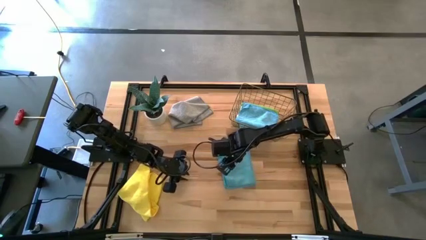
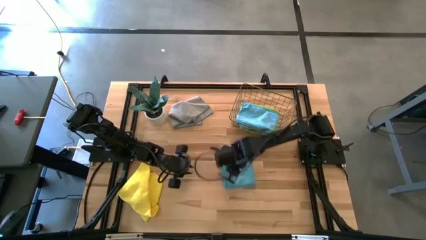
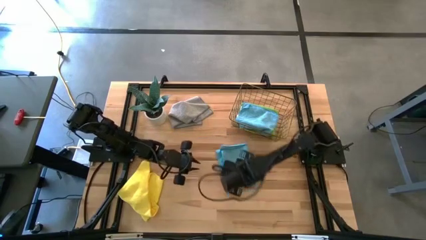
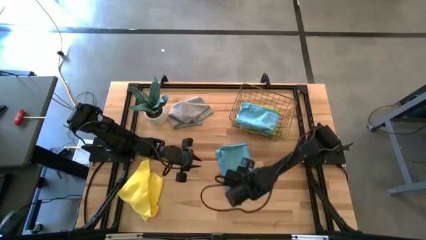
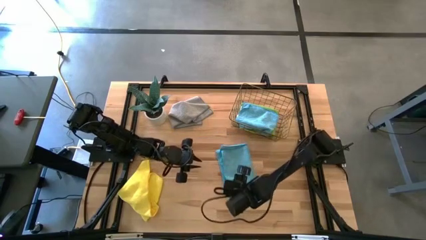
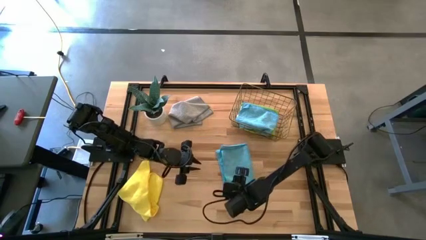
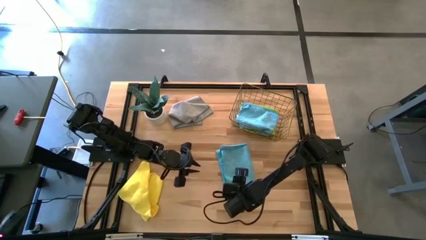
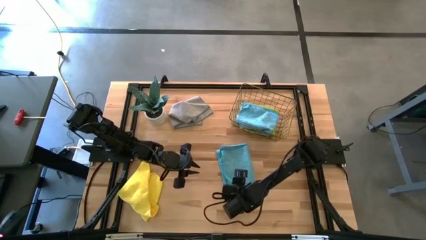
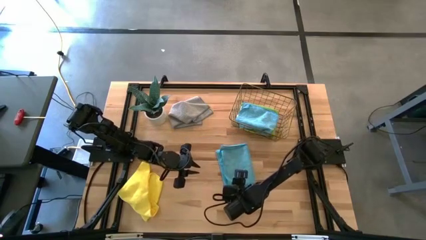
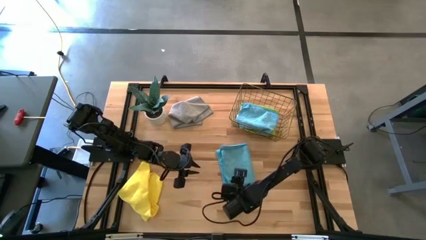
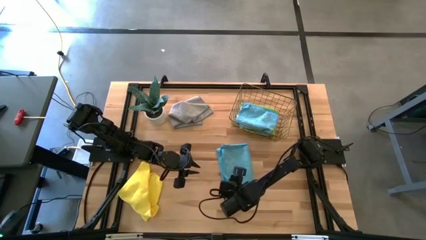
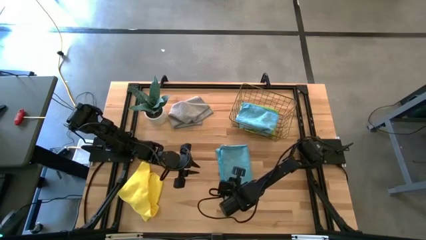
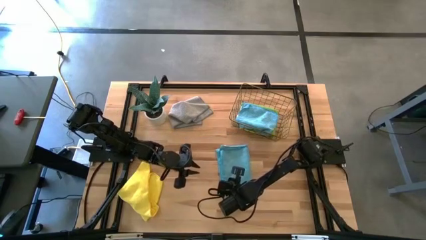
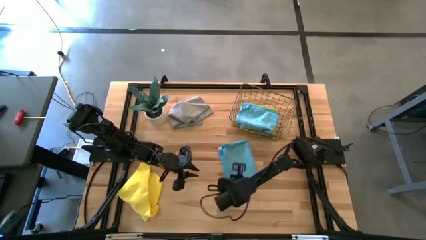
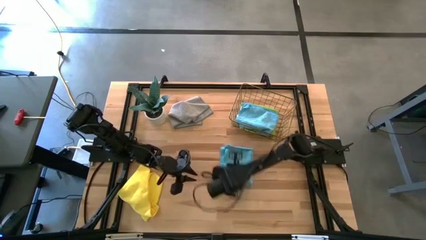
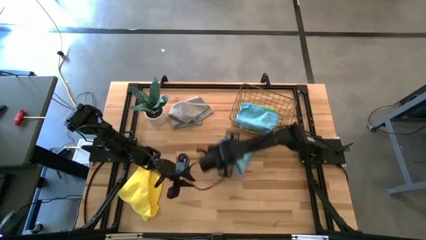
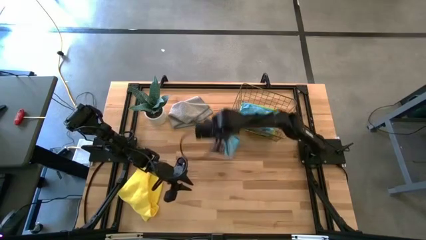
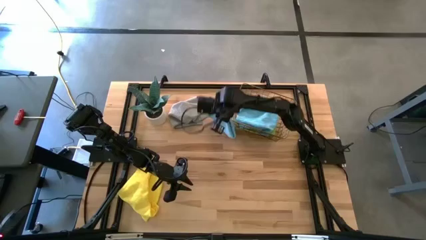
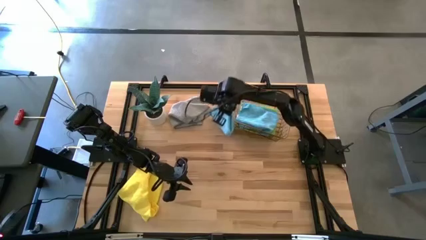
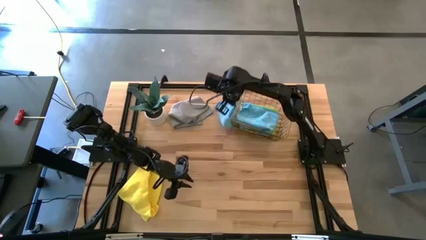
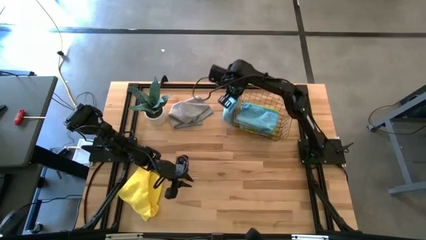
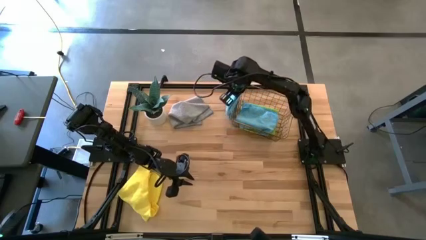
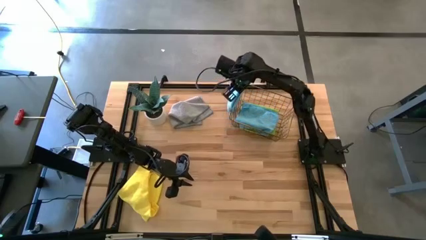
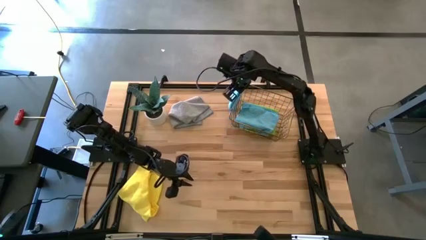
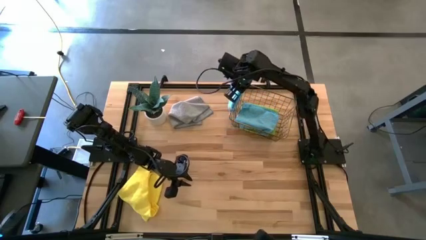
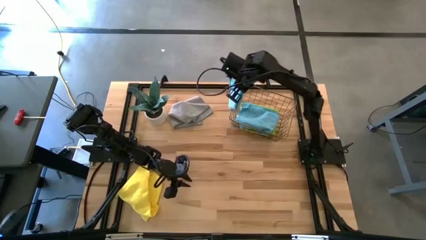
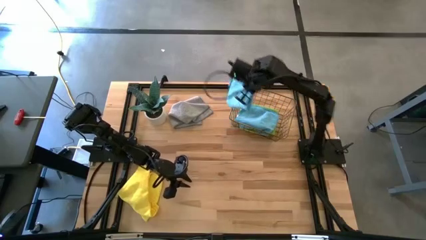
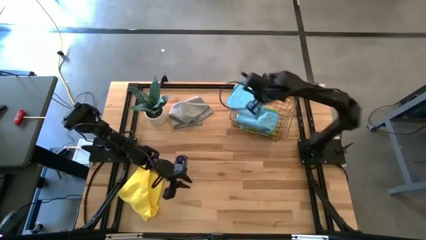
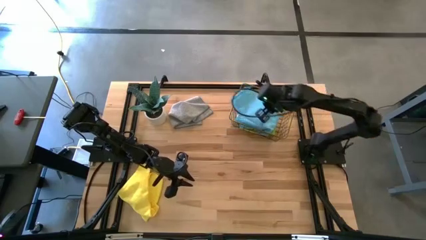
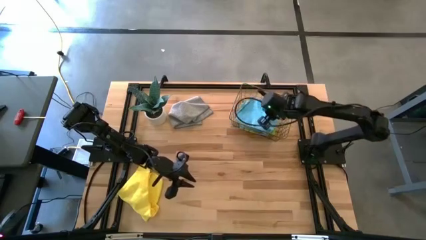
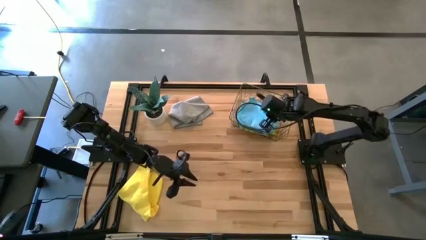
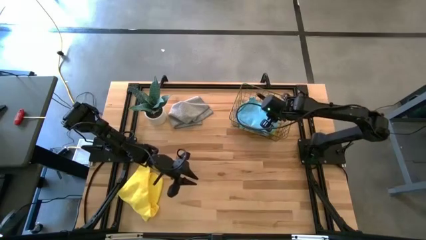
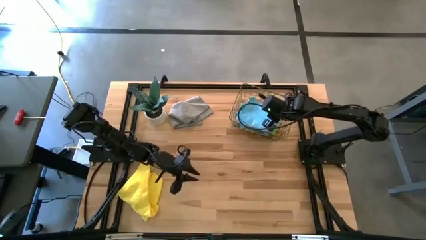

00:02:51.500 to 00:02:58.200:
Task: Fold microfiber towels
Put the folded blue microfiber towel into the wire basket

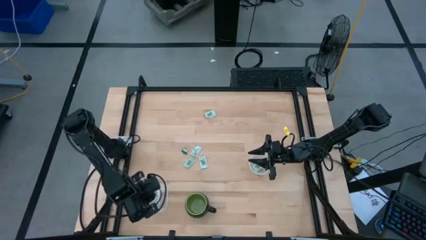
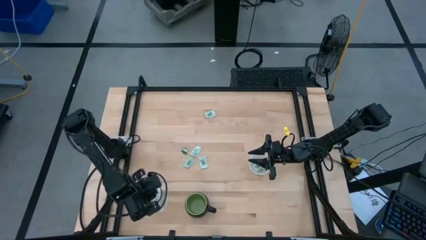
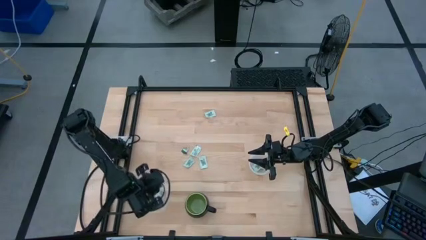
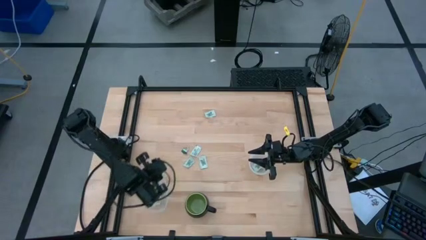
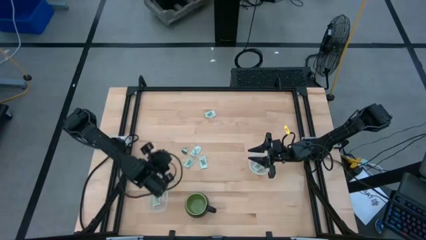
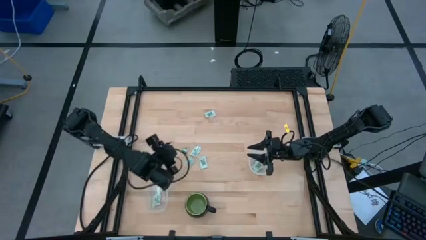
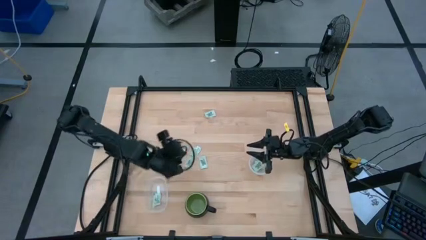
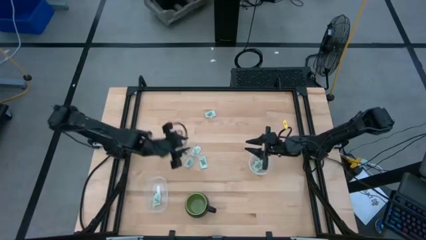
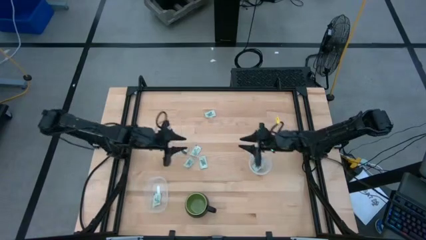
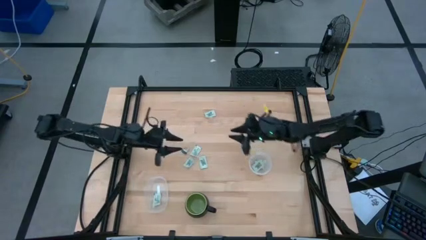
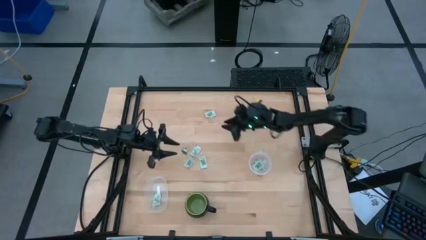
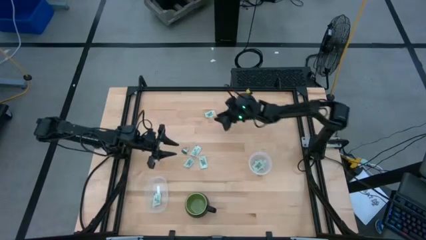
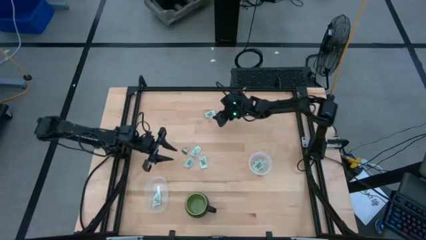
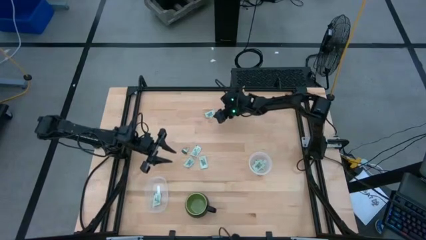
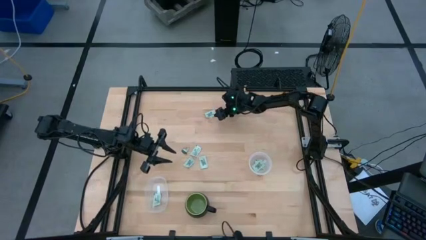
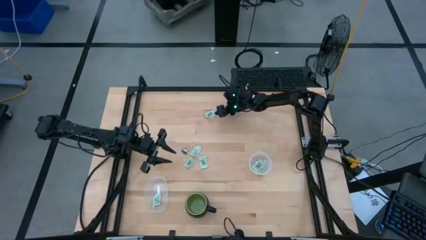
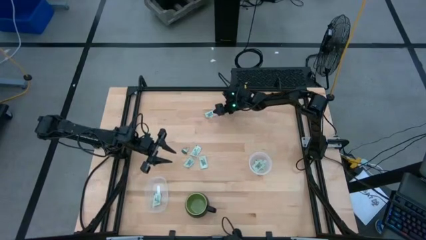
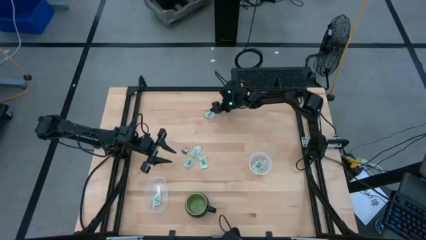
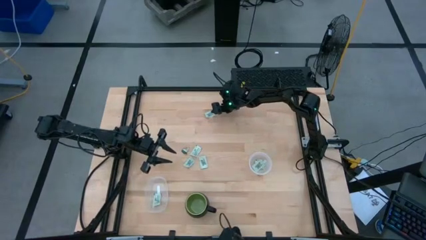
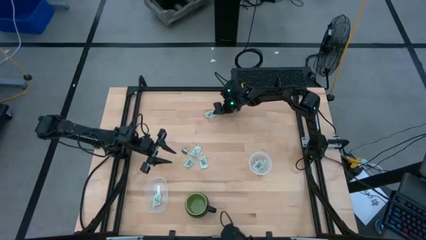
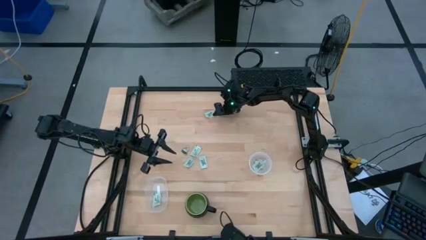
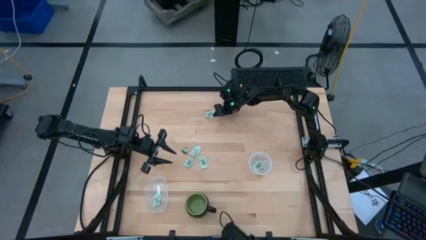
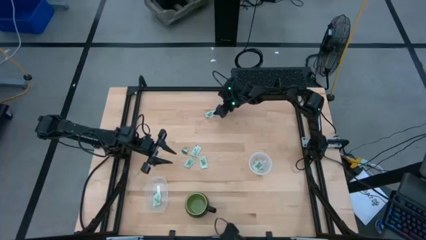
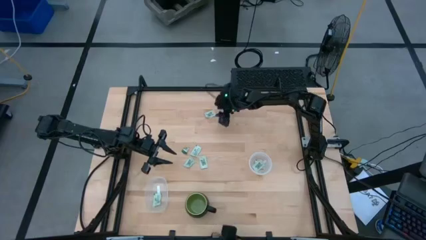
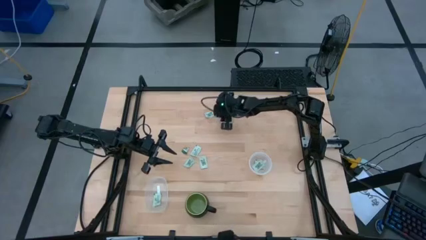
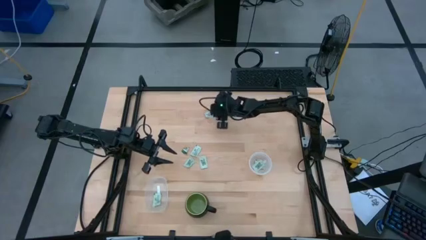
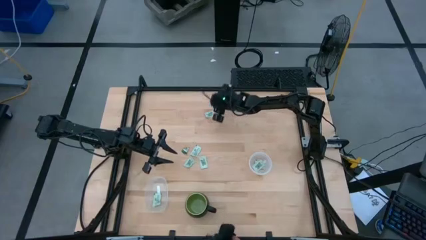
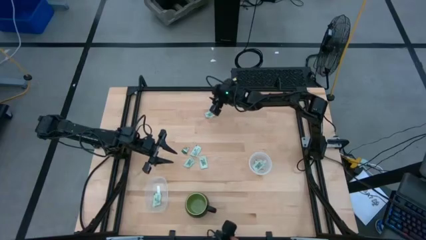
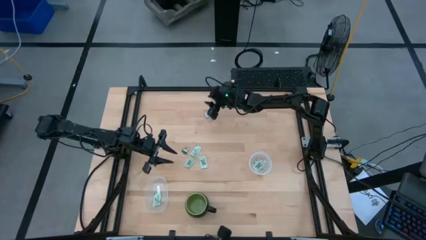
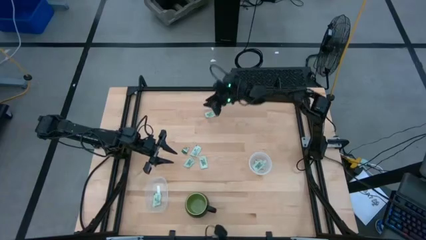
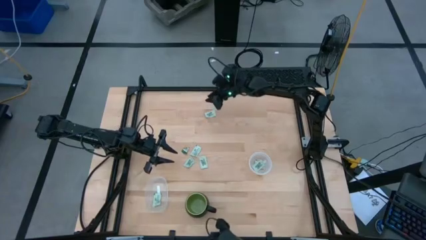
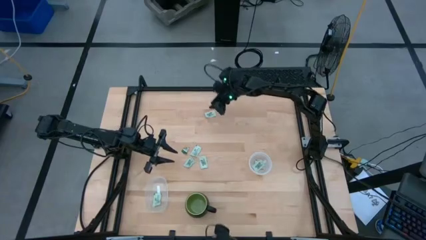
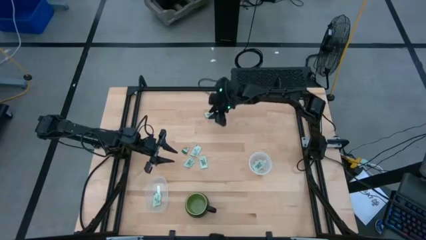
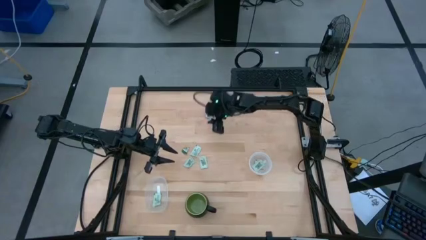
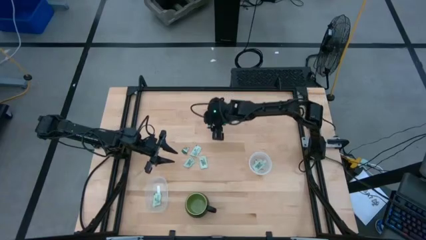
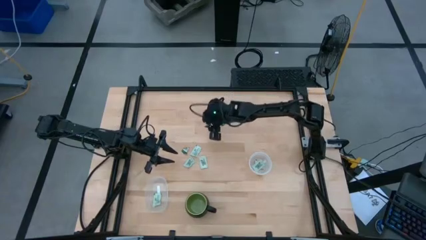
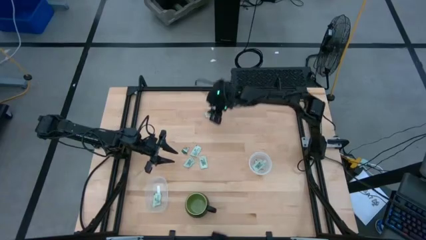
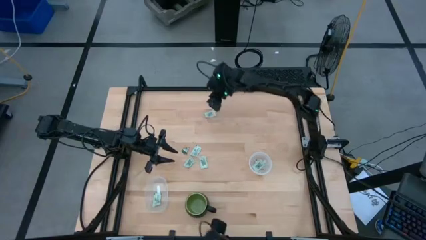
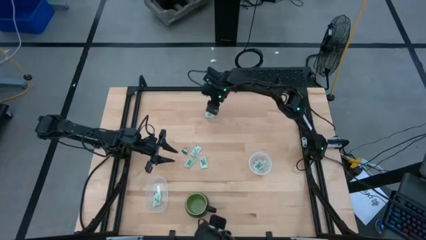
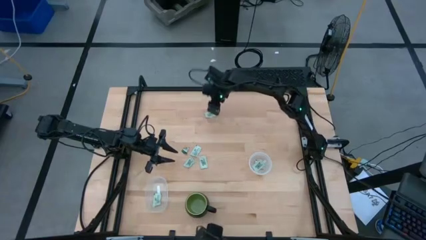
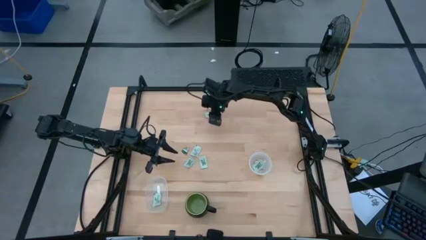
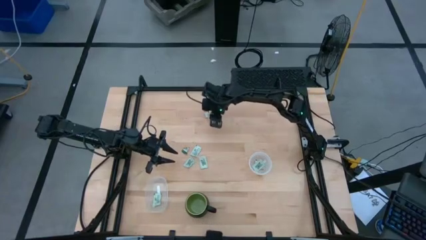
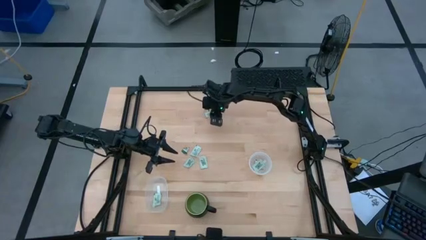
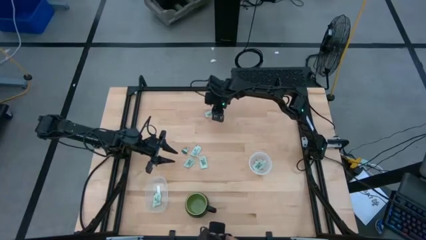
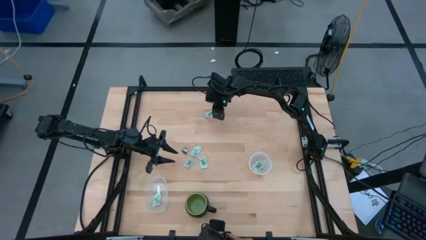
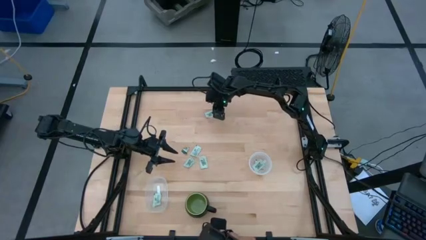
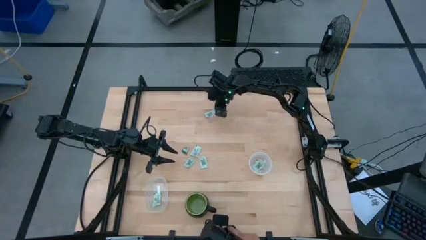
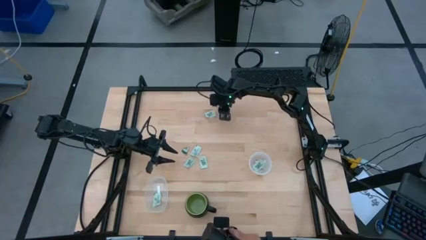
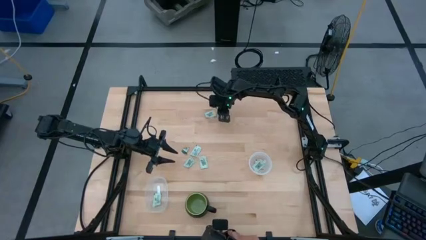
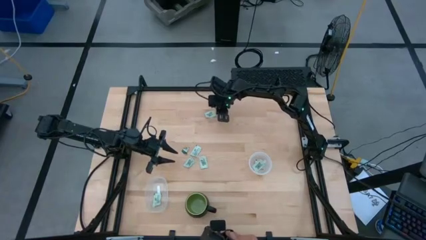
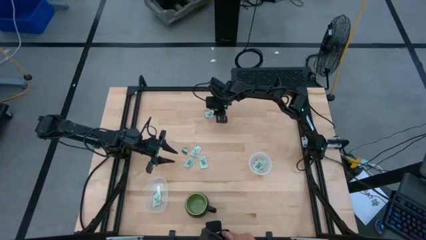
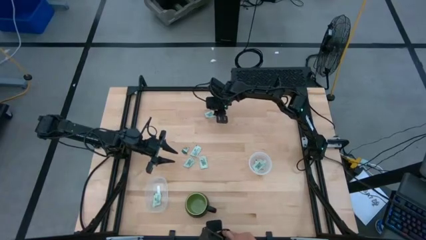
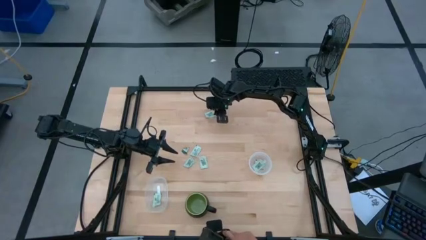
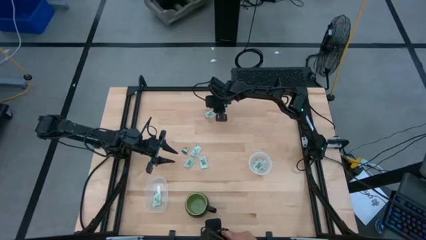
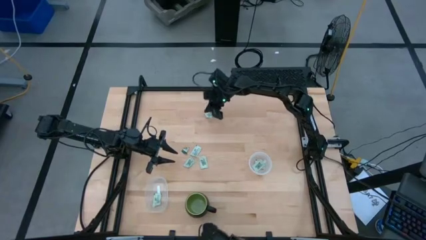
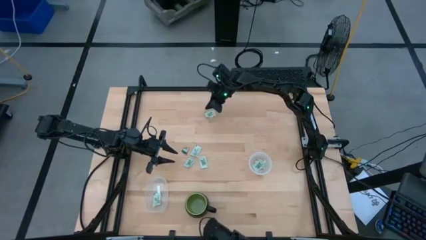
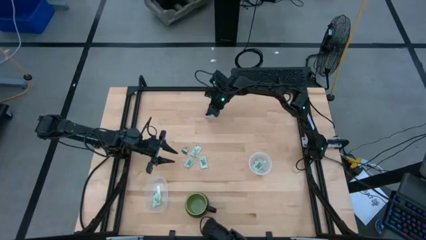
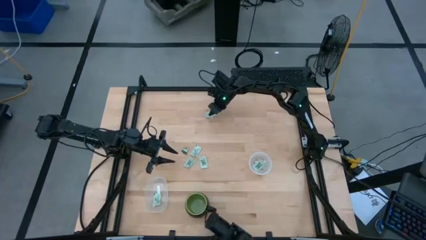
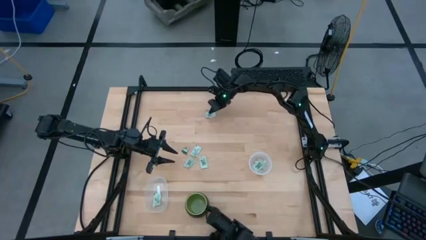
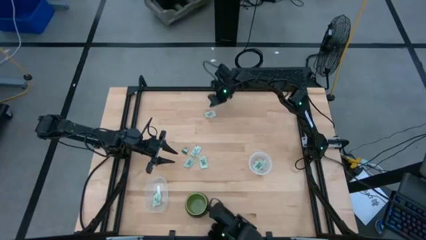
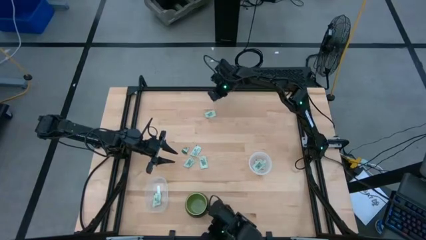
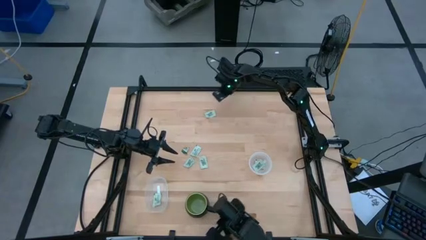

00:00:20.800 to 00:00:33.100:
Task: Pick and place Stevia / Truvia into bins
Put the white stevia packet into the circular transparent container
